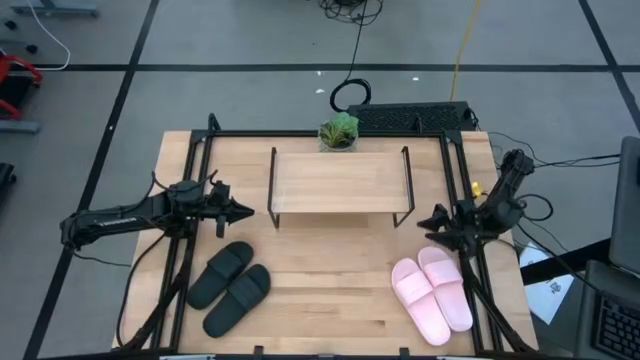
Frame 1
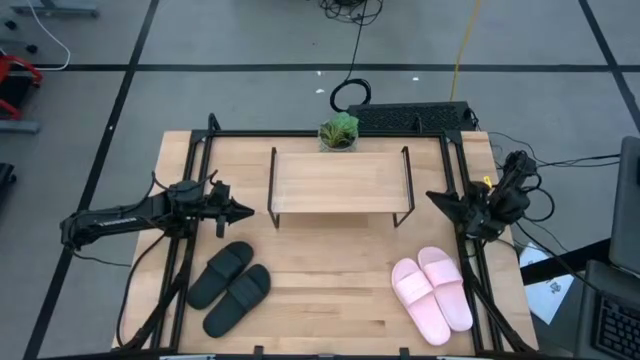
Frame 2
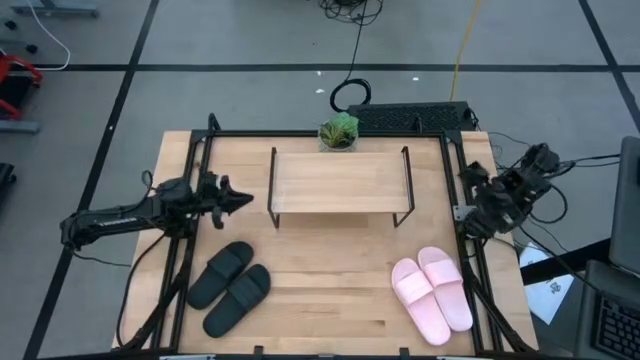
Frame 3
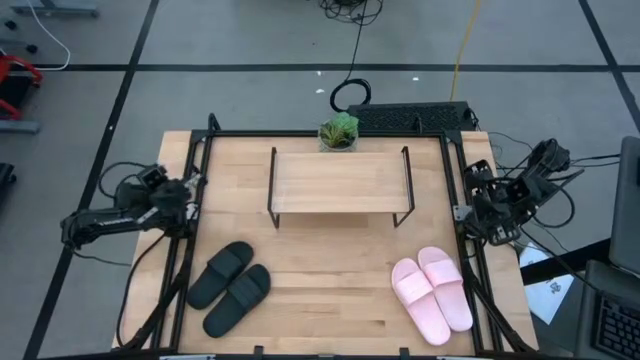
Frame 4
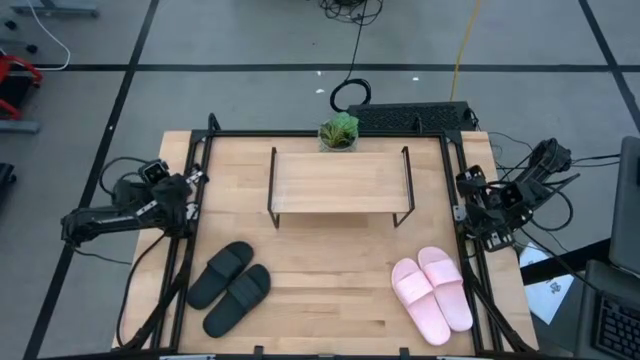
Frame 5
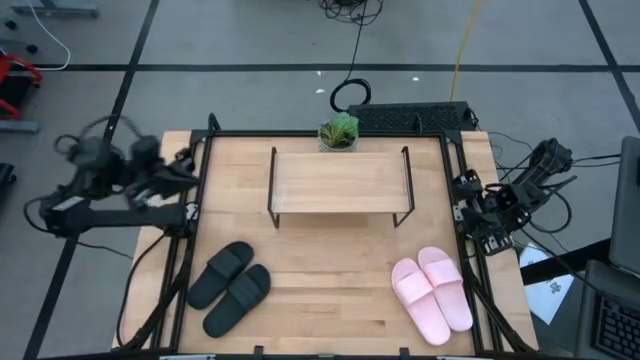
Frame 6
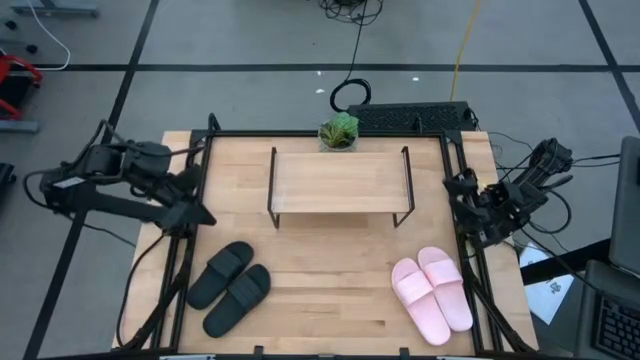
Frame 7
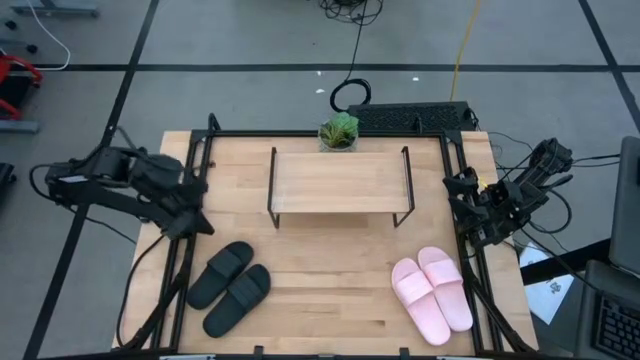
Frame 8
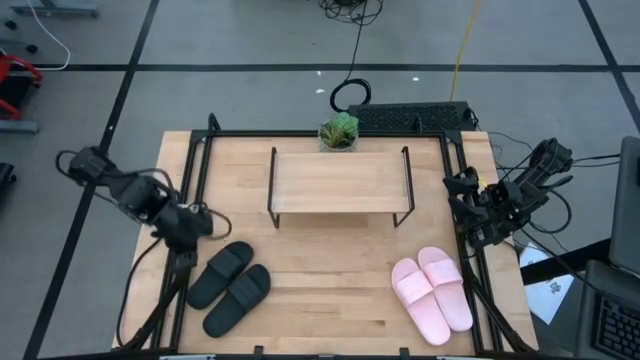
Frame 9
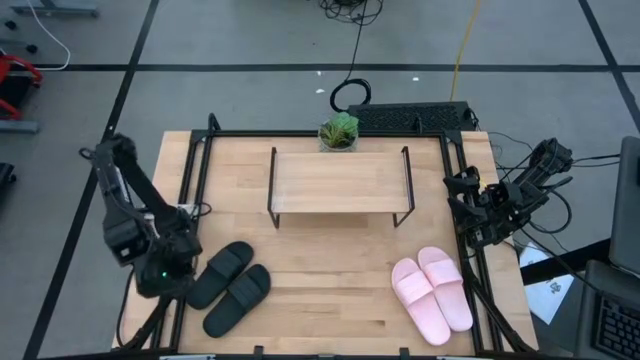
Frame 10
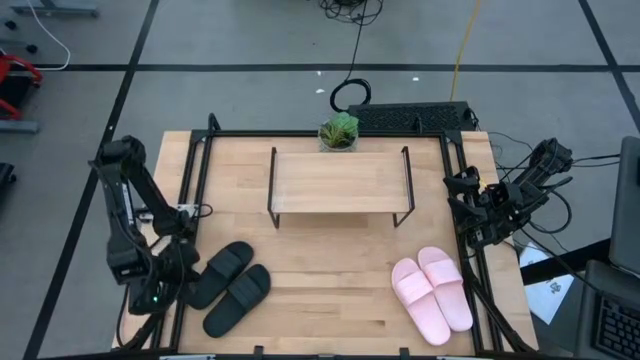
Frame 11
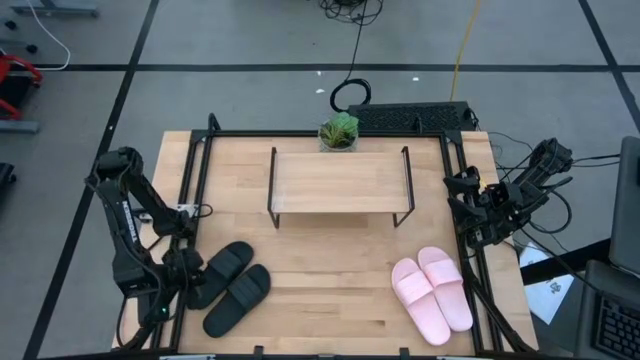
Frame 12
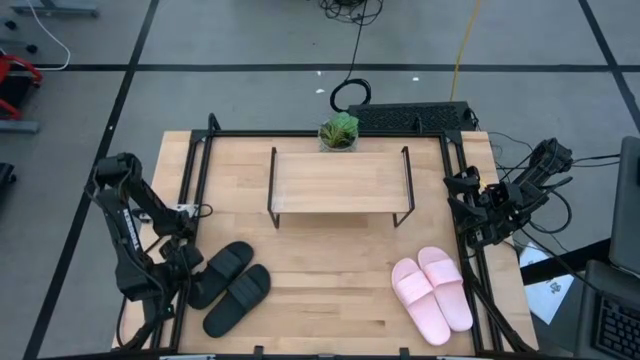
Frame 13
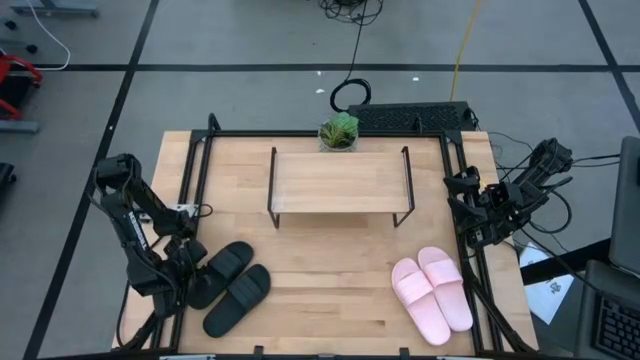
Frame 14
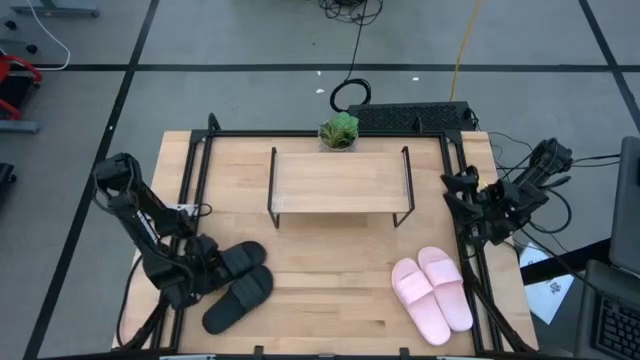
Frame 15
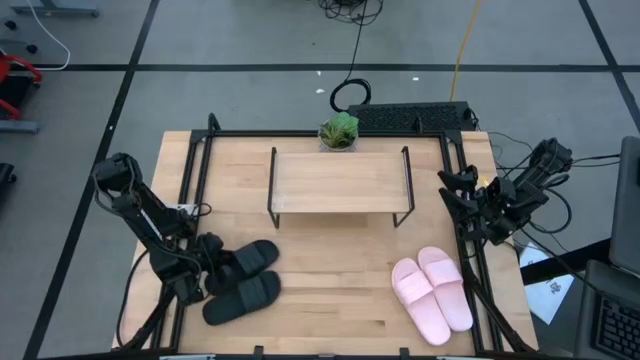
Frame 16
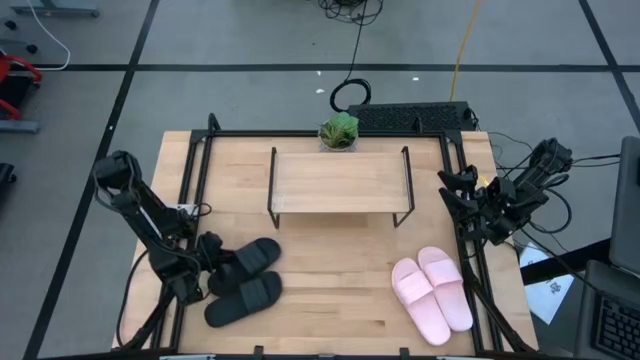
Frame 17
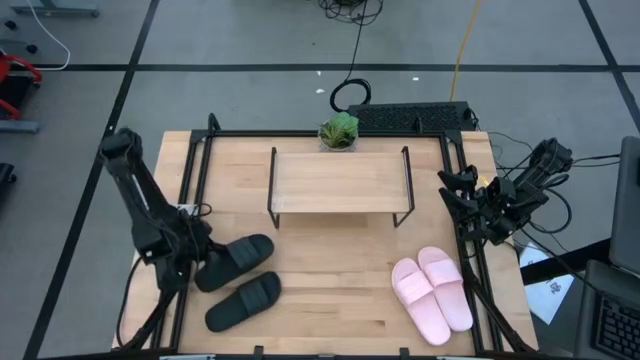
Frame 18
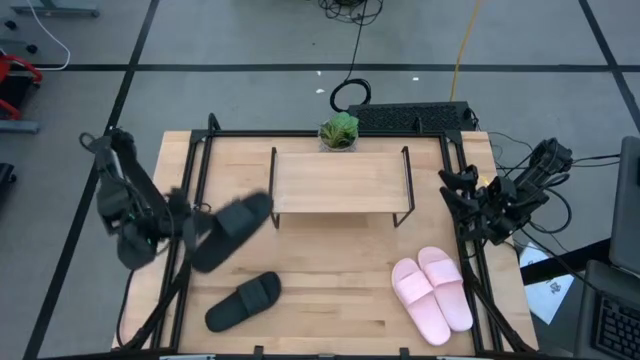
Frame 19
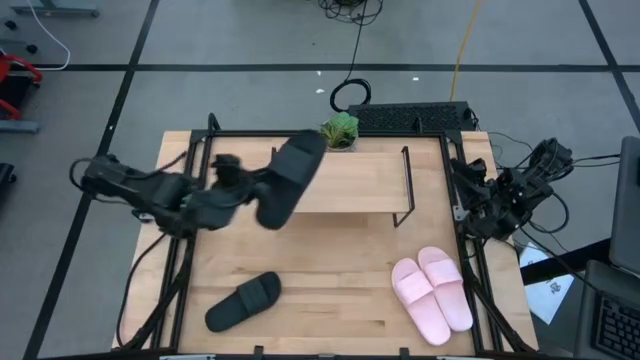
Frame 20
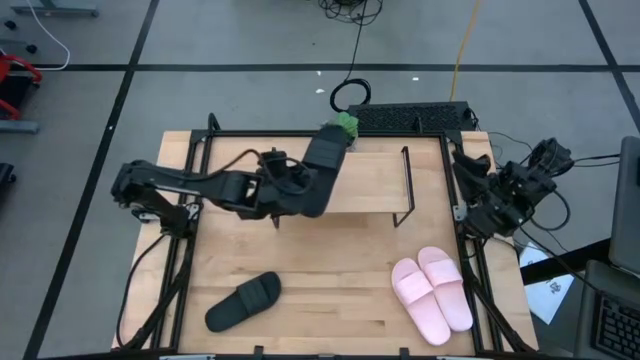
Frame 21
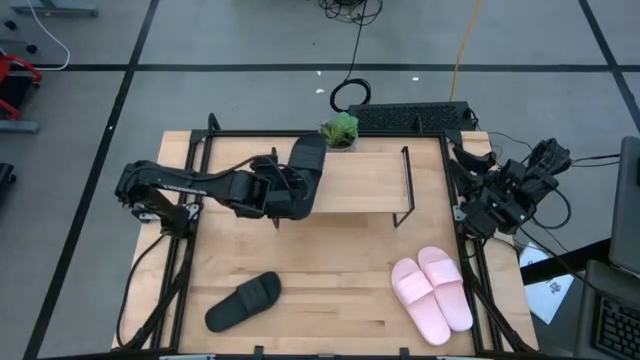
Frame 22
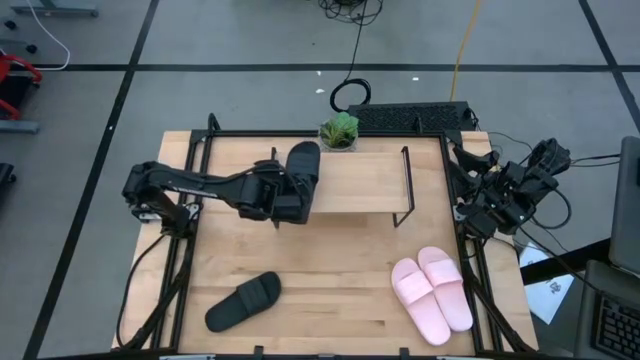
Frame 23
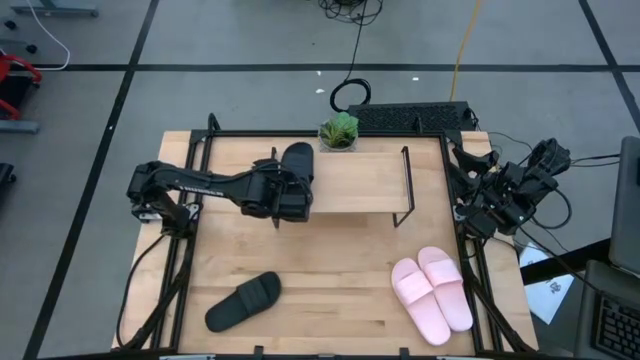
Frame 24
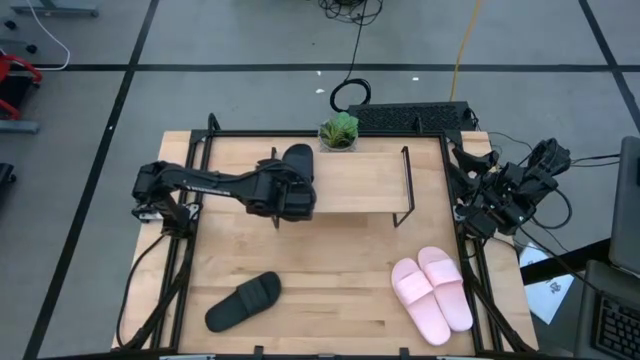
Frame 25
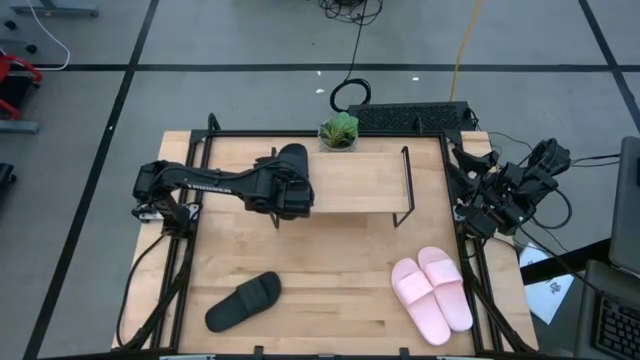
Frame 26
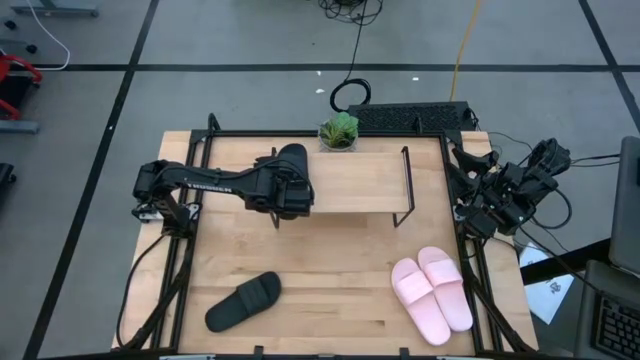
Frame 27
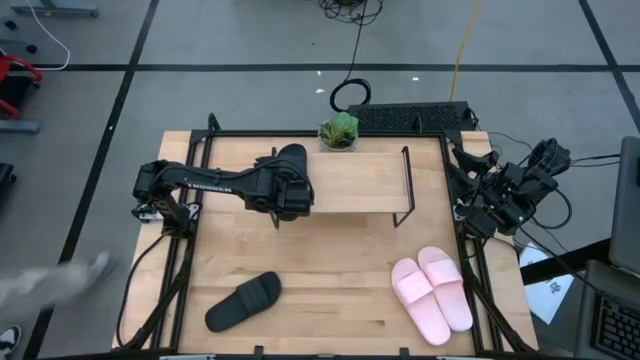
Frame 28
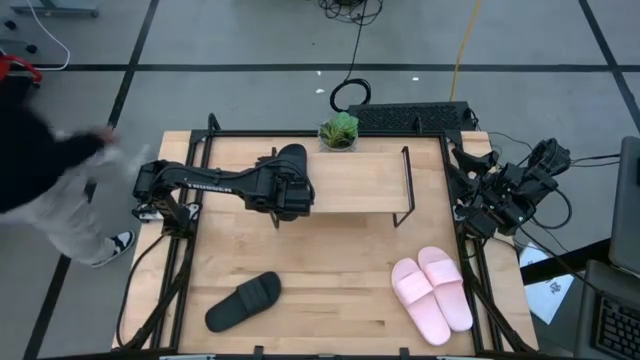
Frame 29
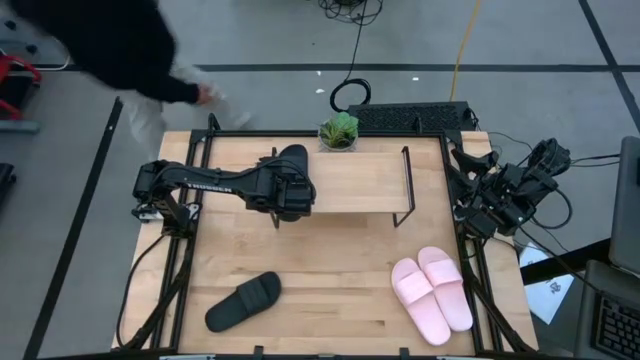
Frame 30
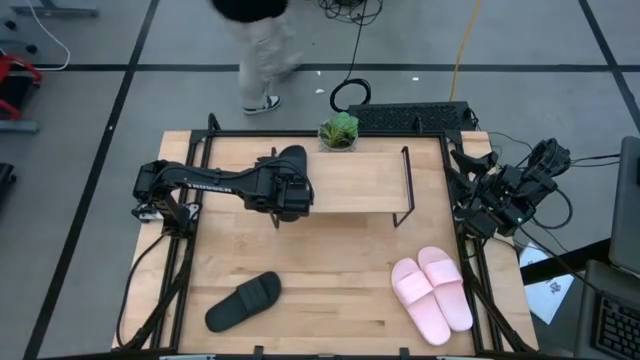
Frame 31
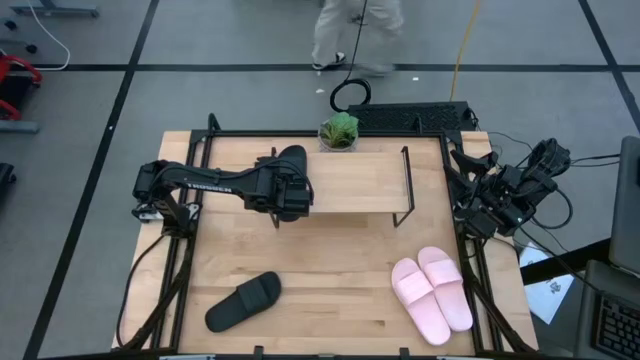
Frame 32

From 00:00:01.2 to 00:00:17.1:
Task: Pick and place slides into the shelf
Put the left black slipper on the shelf

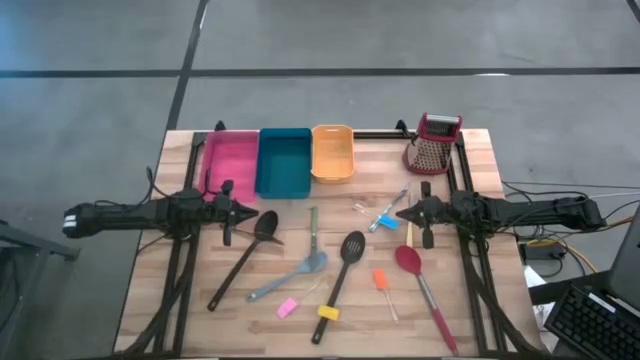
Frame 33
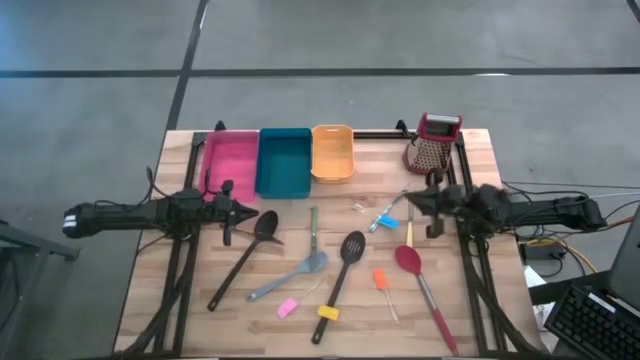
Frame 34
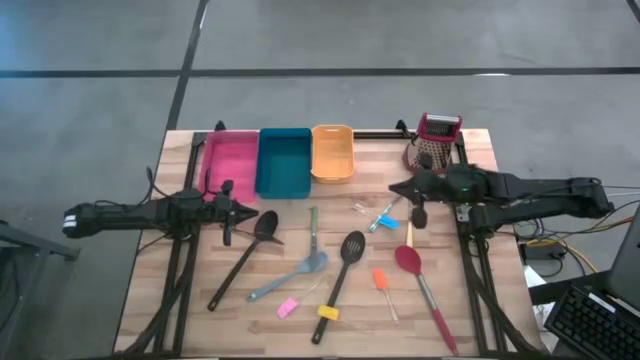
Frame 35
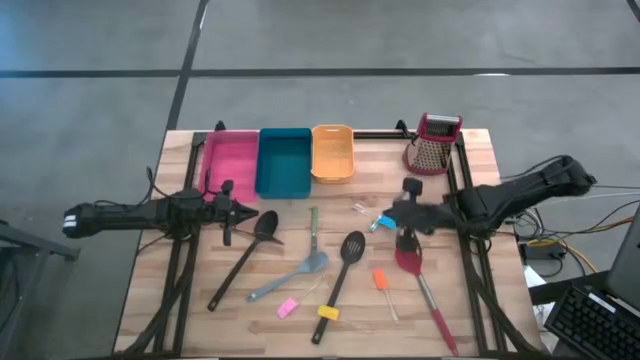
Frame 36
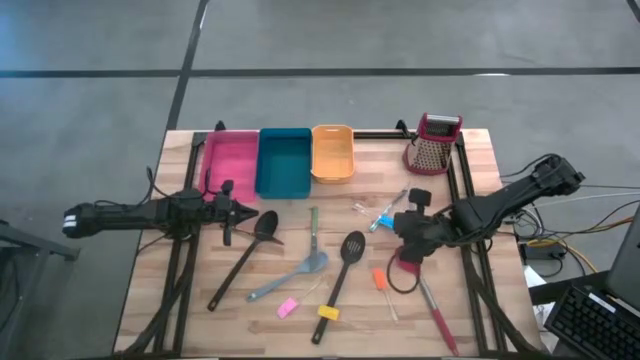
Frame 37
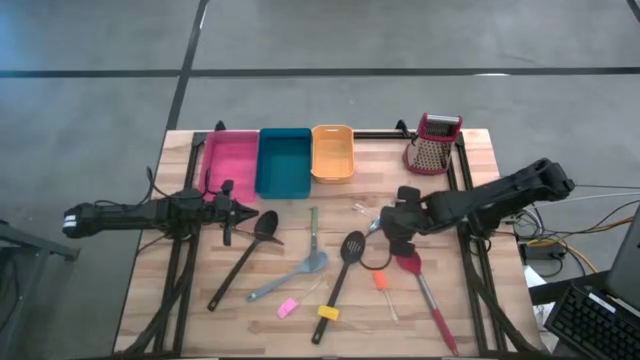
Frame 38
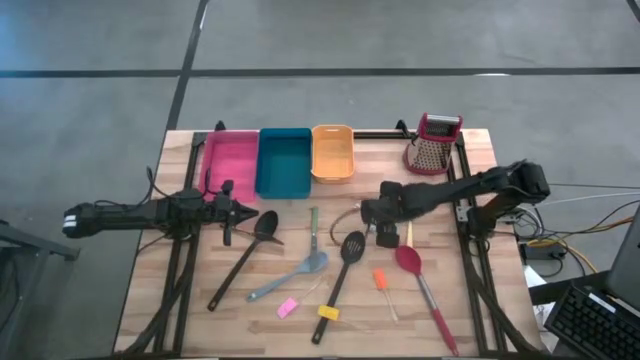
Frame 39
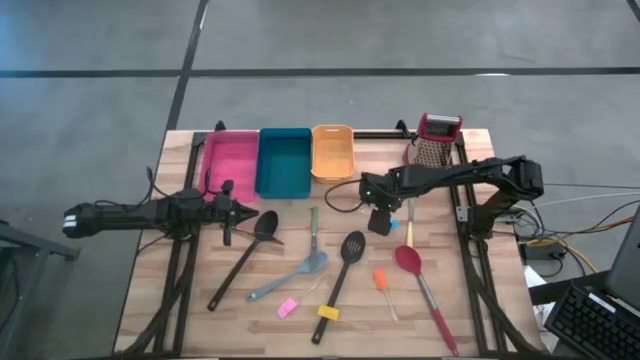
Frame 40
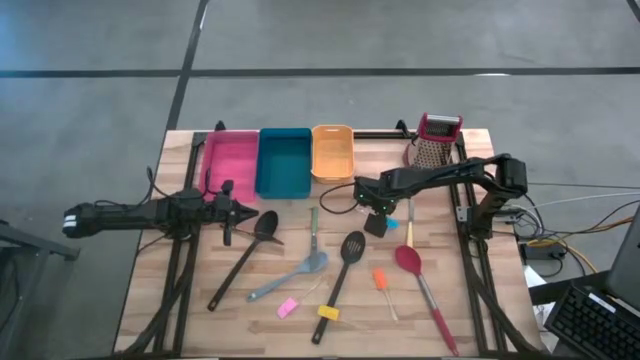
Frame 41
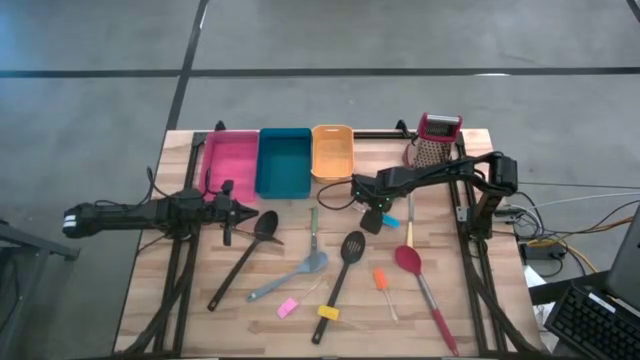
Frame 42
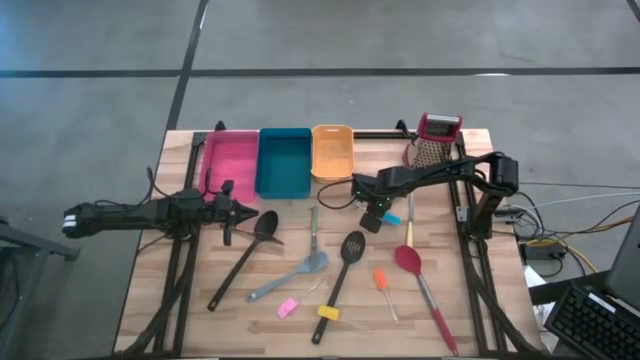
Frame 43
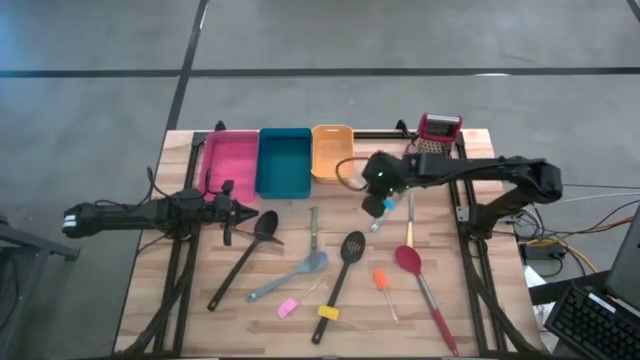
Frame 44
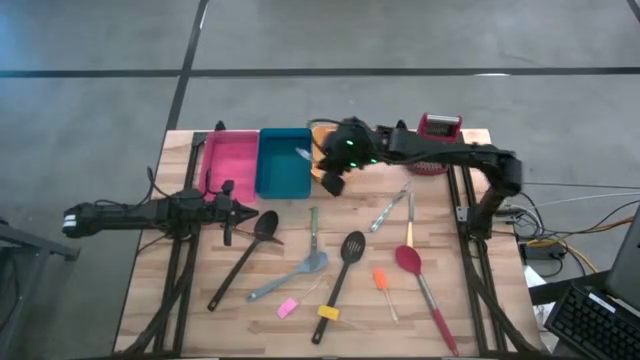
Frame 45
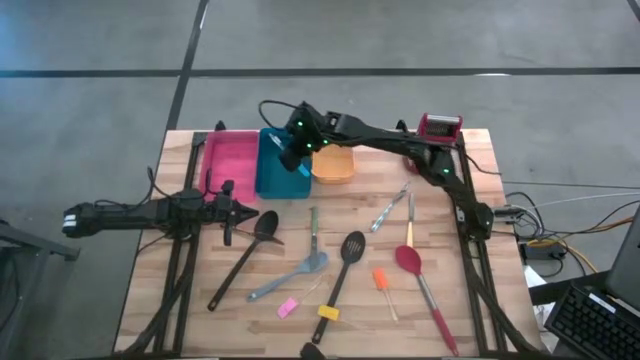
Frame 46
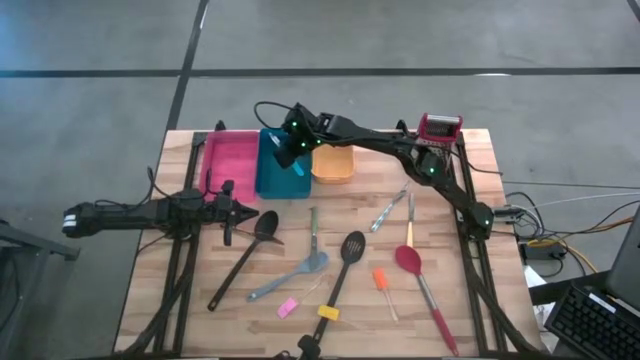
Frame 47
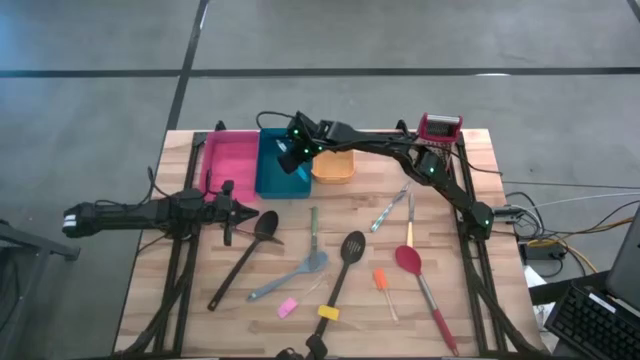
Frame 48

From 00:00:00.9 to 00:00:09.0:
Task: Pick & Place Kitchen Items
Put the blue spatula into the blue bin
